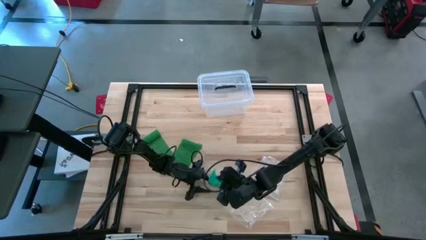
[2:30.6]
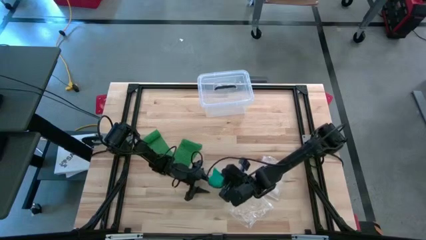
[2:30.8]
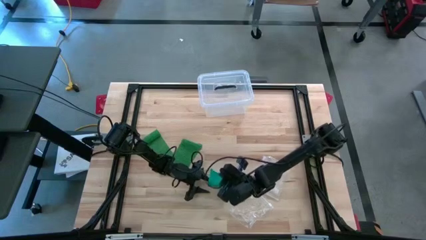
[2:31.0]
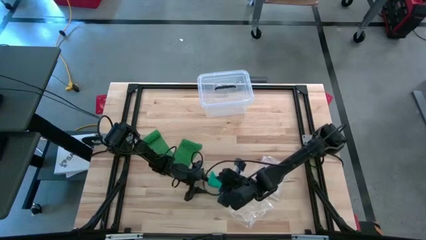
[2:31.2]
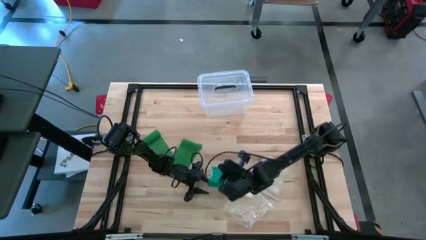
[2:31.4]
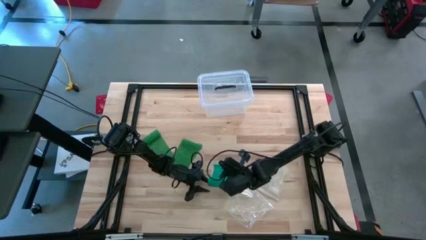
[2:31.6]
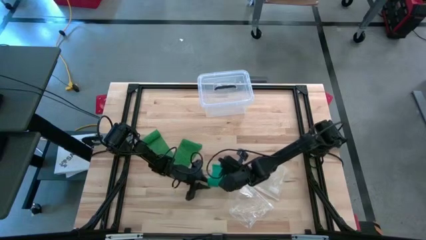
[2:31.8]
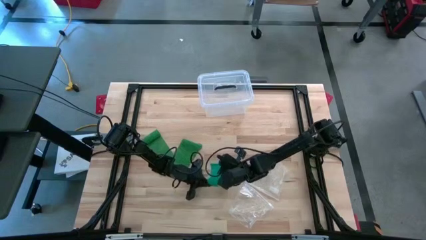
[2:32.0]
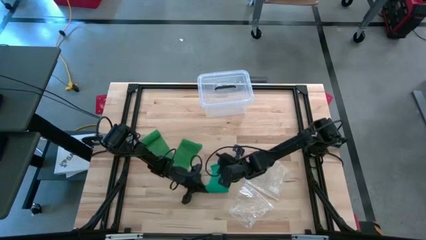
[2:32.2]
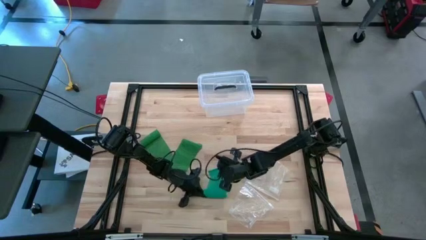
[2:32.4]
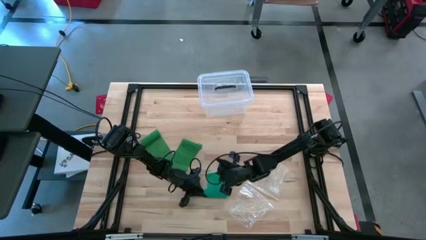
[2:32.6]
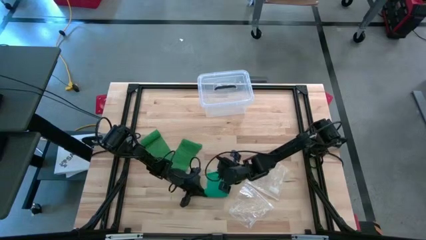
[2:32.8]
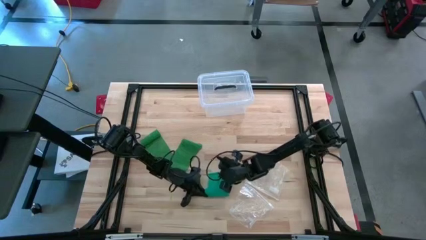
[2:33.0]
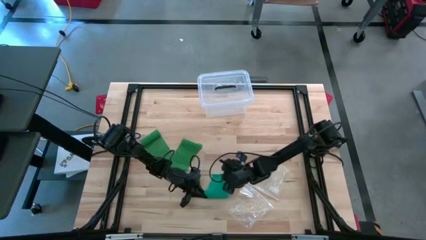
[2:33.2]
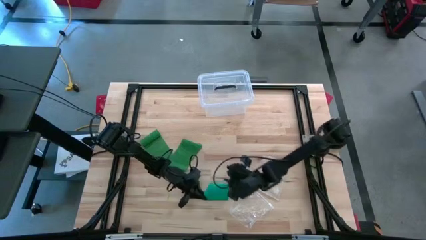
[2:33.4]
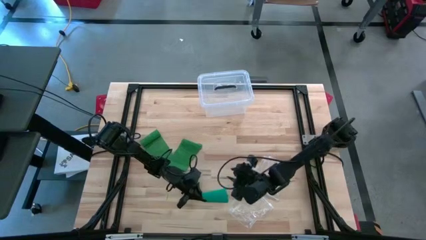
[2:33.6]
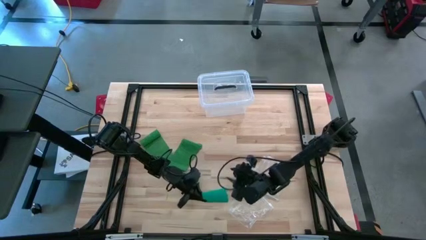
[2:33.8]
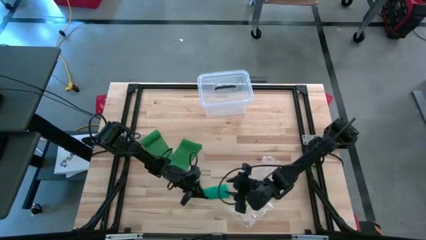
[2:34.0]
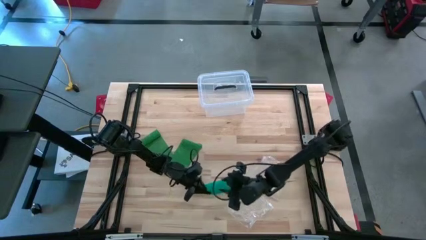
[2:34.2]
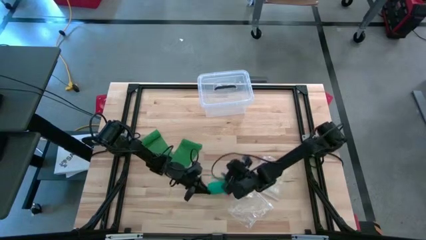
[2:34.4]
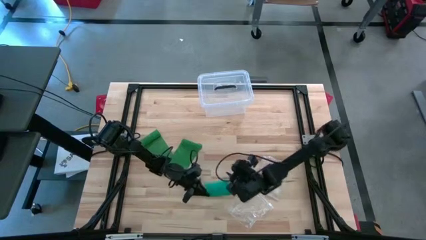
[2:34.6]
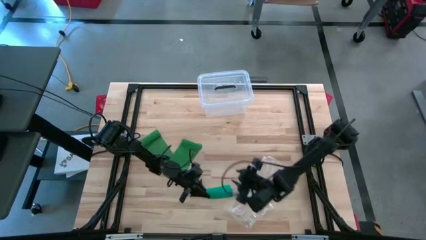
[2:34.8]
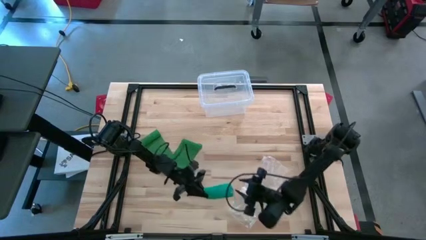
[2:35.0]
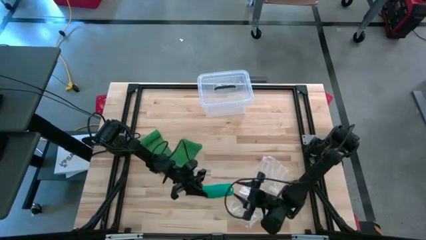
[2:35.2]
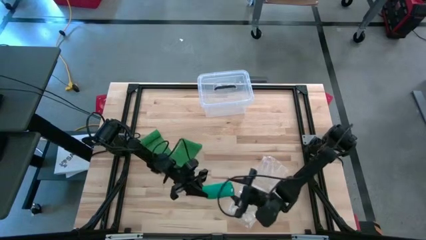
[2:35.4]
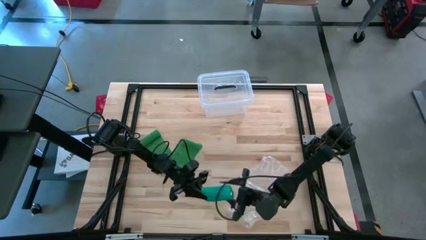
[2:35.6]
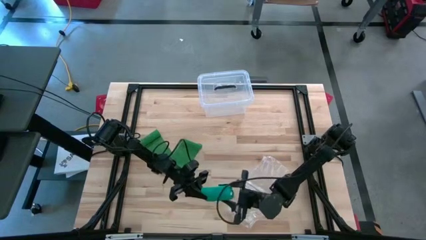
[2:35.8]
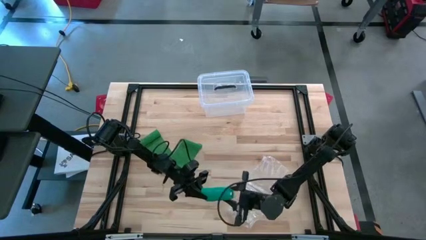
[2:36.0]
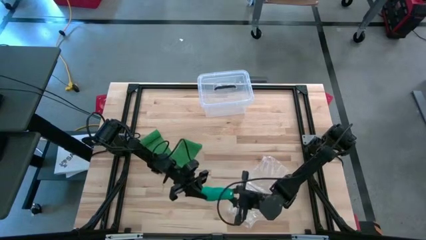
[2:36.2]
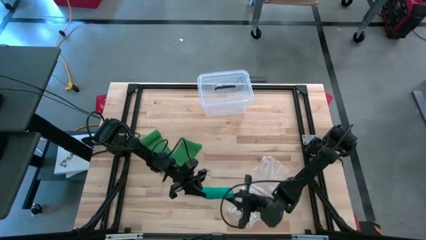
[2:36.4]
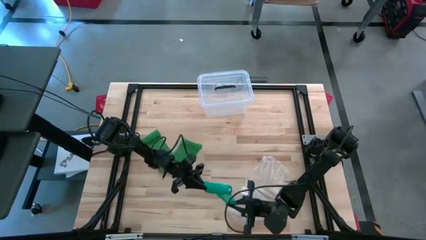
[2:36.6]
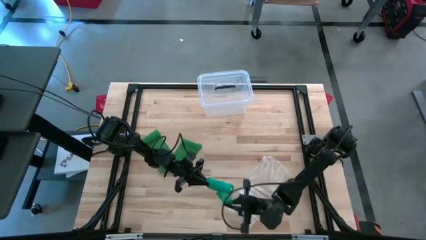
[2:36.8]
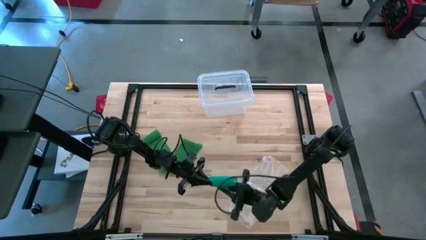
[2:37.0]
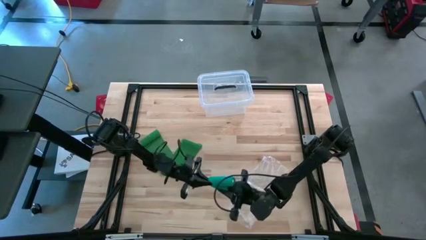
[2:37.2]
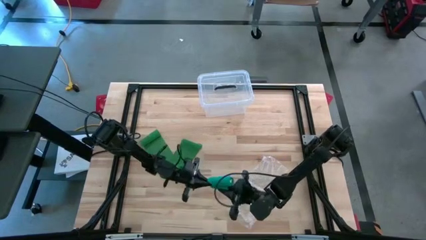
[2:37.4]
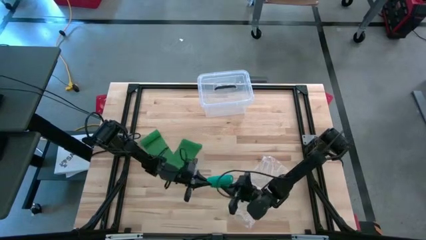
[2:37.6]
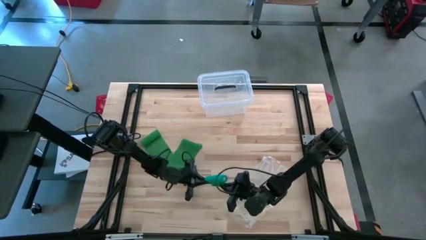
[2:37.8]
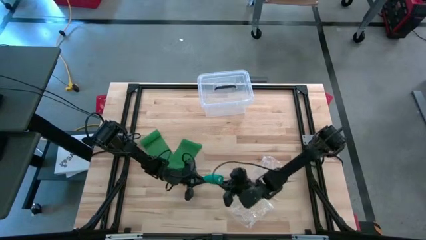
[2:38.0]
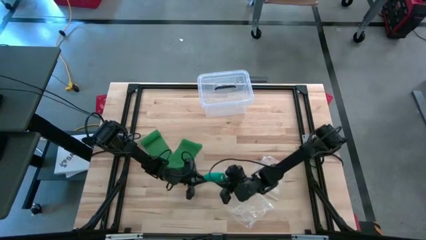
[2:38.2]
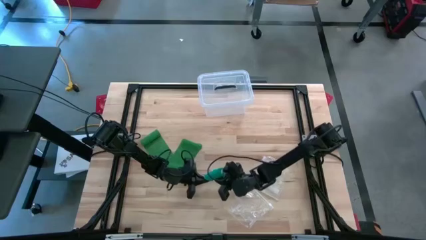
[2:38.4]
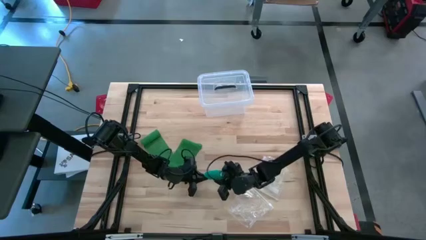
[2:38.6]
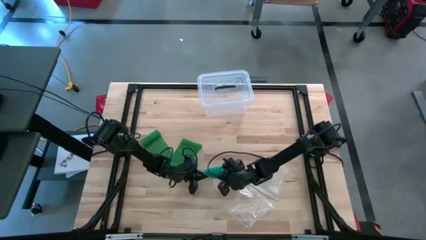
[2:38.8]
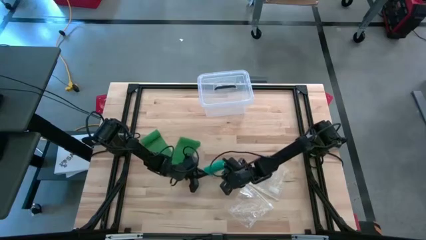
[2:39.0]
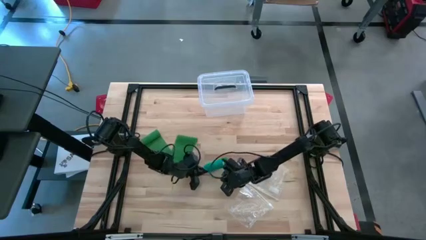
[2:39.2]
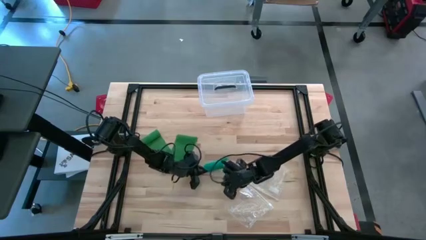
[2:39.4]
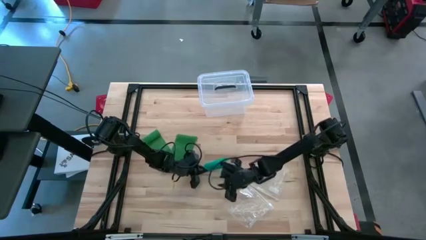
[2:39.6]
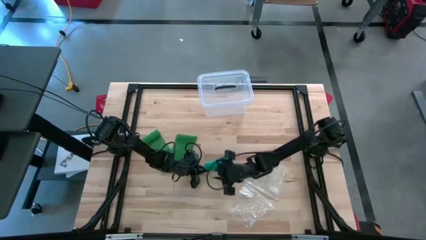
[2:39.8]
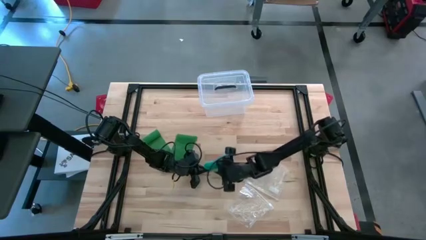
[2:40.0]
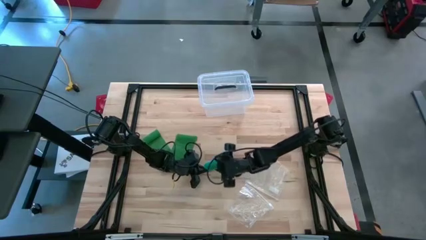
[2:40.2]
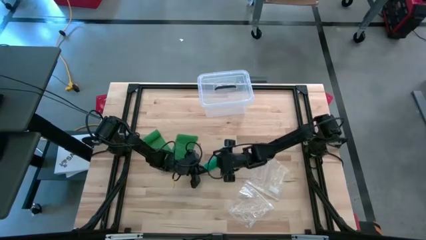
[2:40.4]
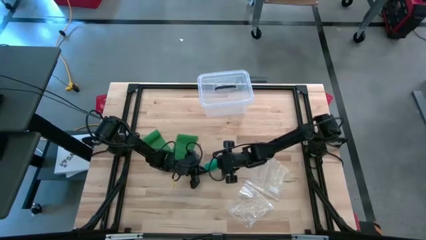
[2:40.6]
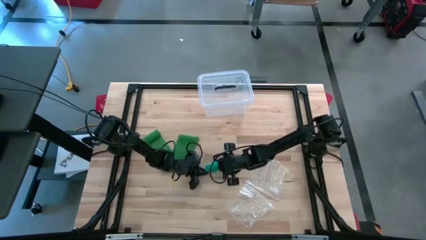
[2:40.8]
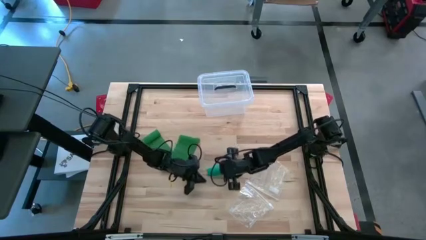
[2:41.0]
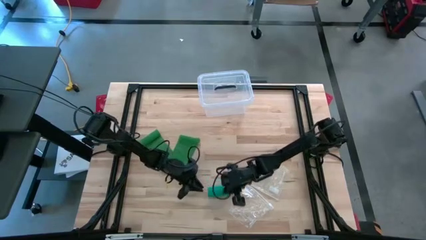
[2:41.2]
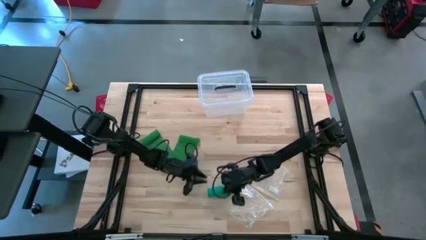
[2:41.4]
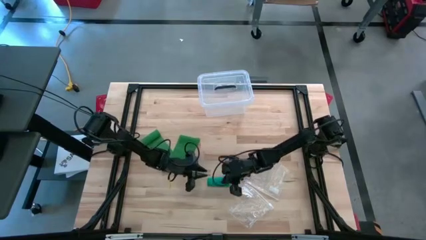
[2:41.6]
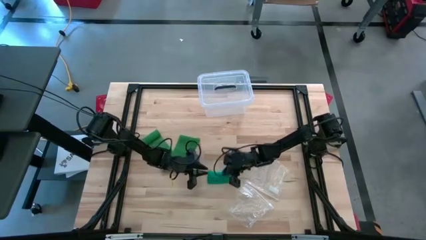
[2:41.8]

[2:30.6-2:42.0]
Task: Roll bandage
Roll the blue bandage

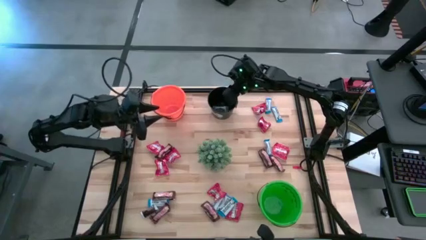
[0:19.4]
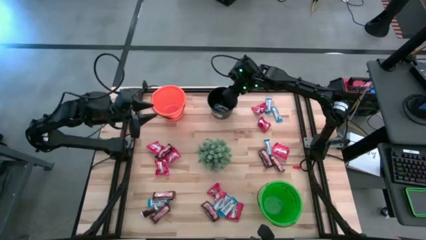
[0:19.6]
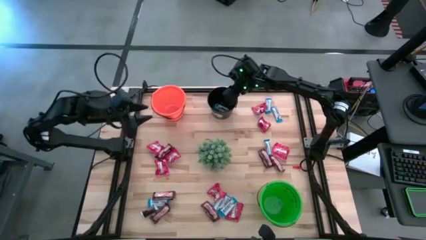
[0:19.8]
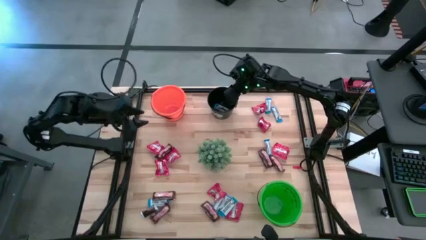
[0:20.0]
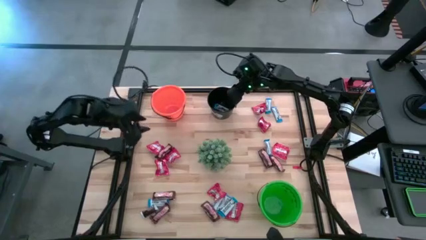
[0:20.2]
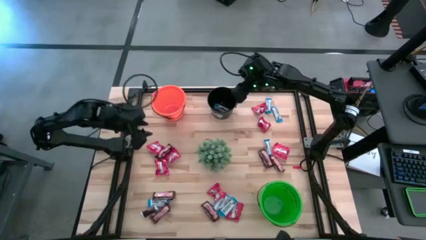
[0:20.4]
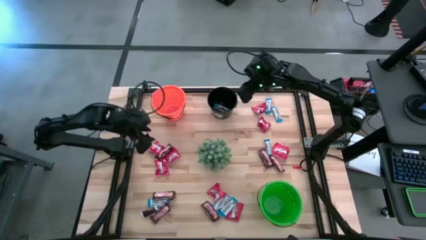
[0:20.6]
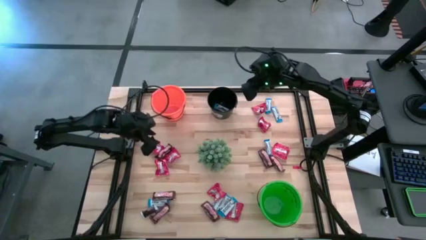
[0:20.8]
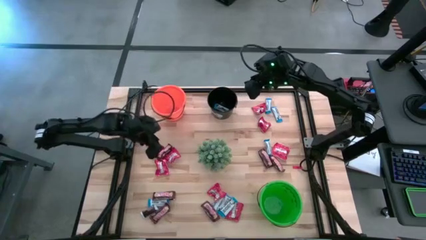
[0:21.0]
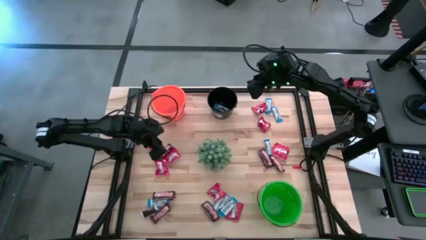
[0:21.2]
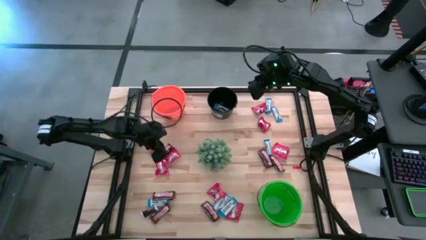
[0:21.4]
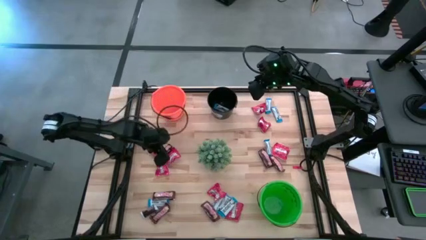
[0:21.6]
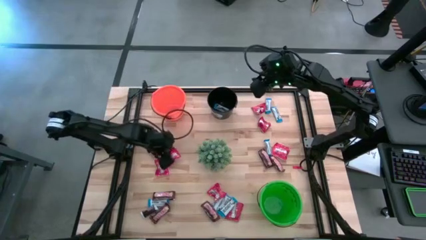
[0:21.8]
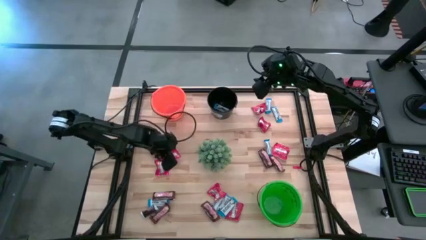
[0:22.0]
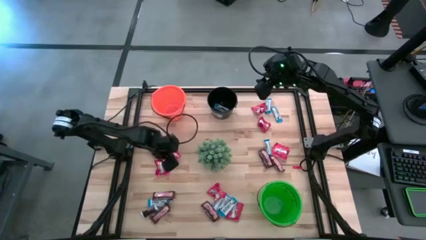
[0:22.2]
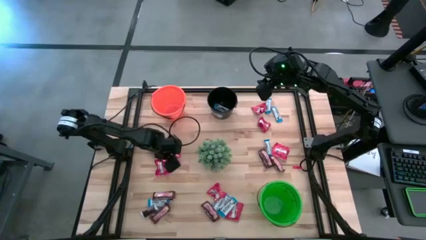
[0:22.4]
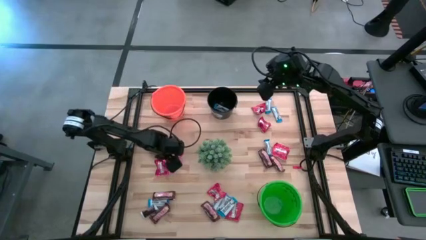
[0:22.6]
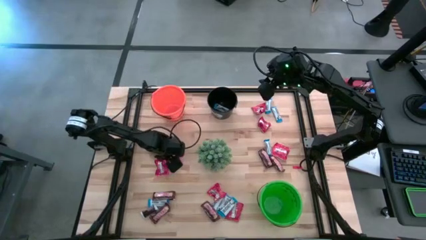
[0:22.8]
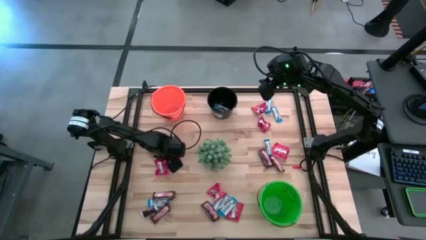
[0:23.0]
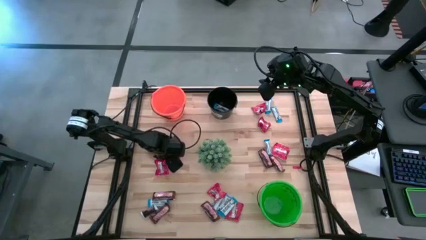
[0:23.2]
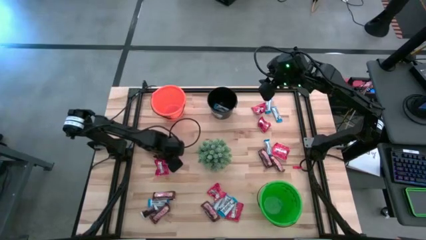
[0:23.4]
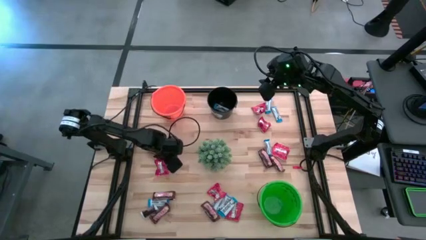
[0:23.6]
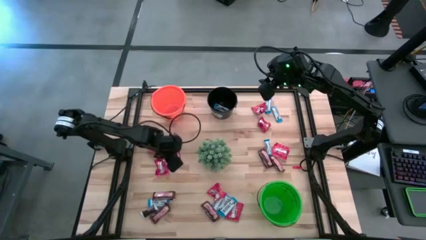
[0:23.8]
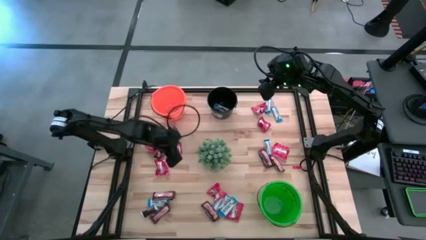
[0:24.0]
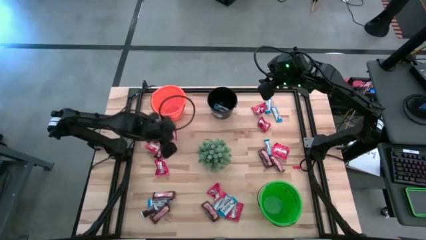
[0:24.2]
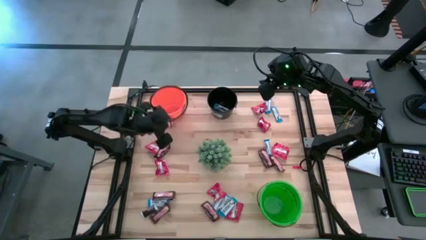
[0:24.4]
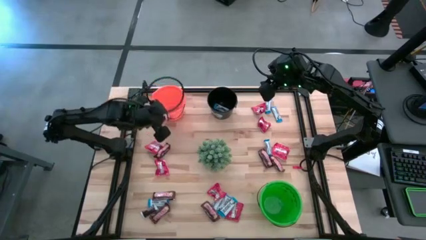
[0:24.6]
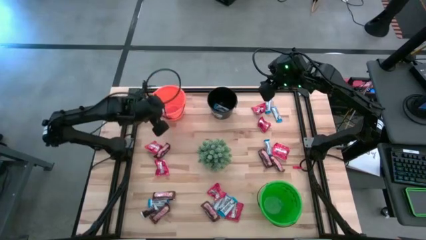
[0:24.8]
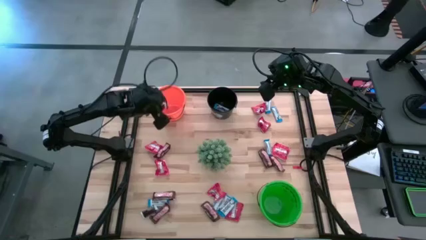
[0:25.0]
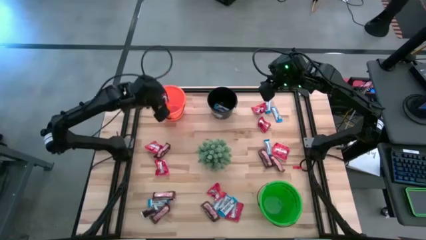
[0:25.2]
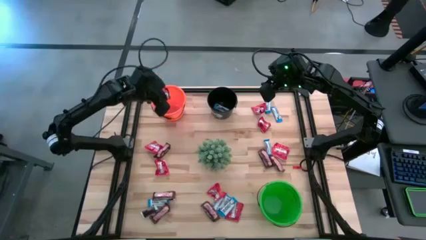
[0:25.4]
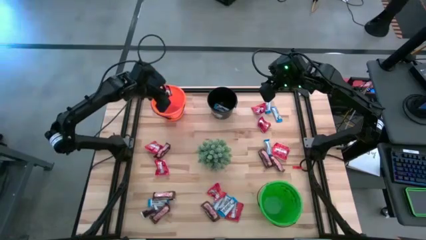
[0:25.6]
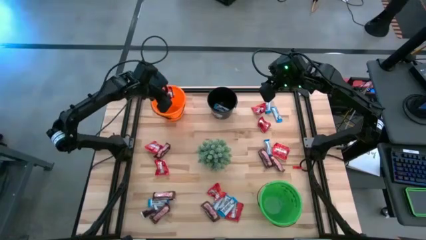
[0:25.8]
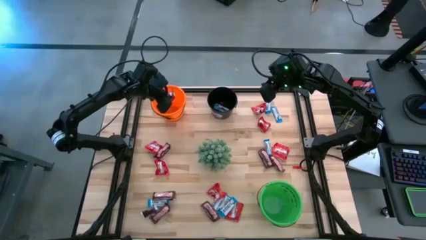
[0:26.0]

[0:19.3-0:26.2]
Task: Organize candy in baskets
Put the red candy into the orange bucket
